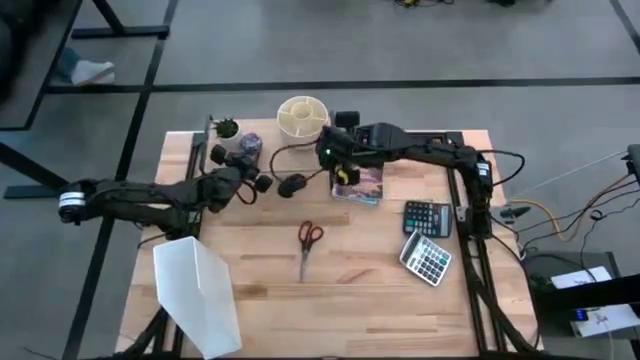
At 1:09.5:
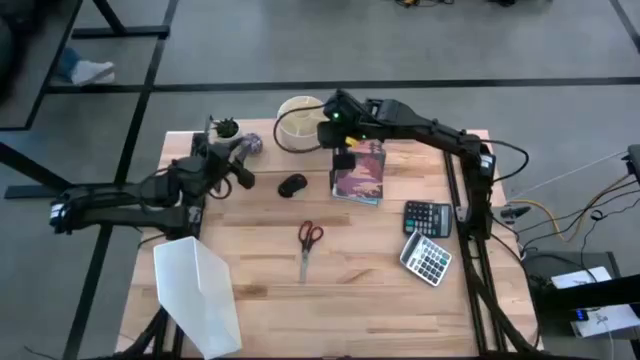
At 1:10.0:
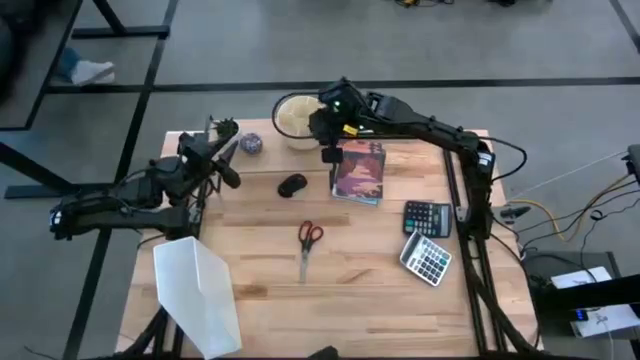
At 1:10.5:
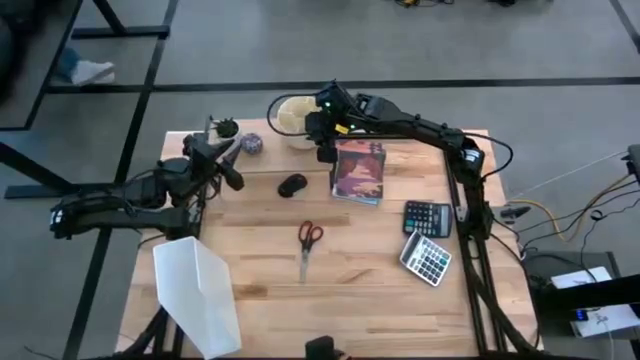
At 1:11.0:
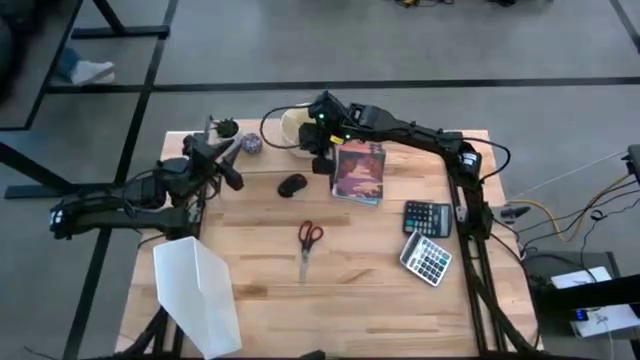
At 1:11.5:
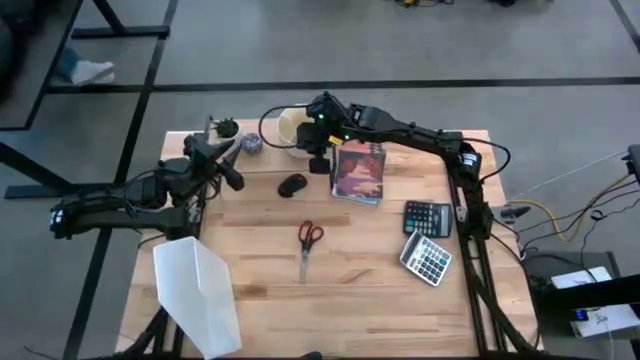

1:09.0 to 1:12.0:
Task: Stock shelves
Adjust the white pen organizer on the shelf

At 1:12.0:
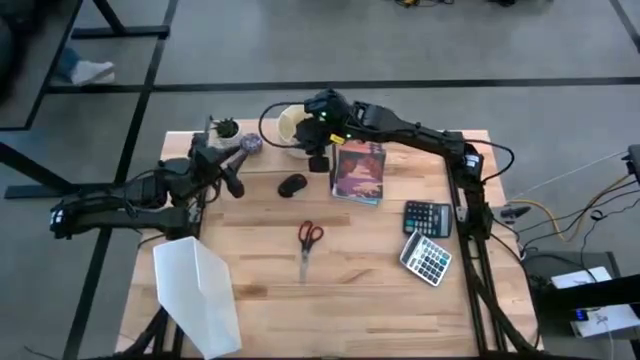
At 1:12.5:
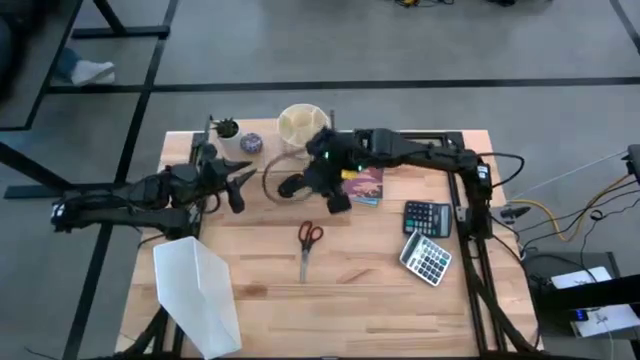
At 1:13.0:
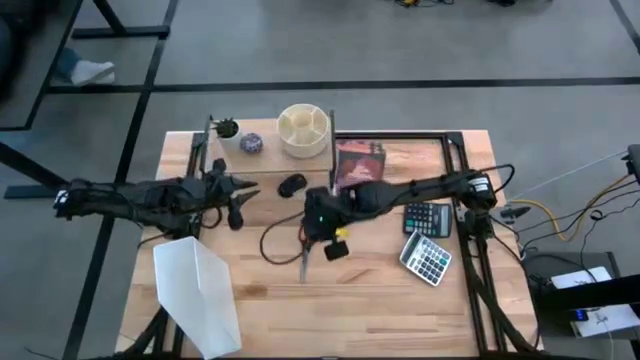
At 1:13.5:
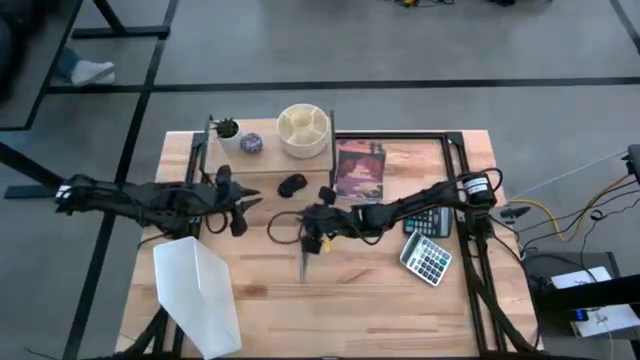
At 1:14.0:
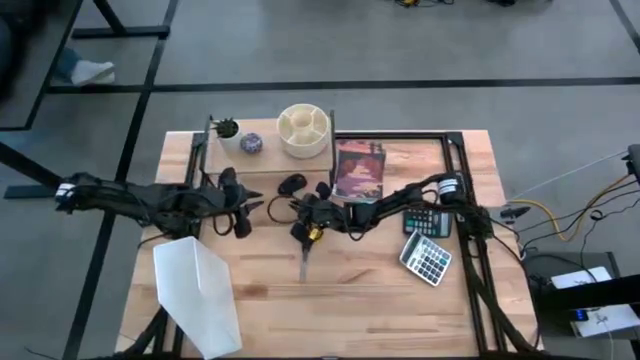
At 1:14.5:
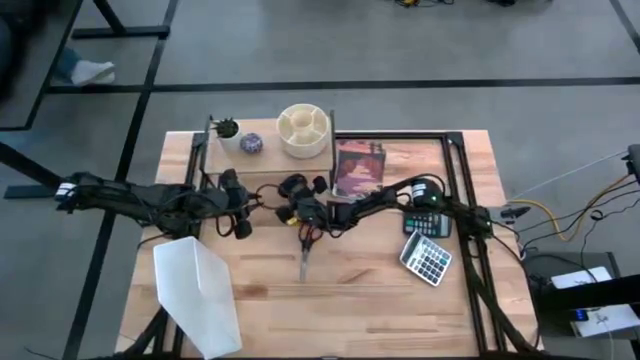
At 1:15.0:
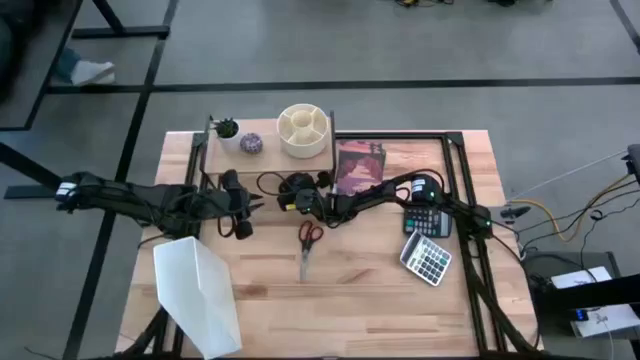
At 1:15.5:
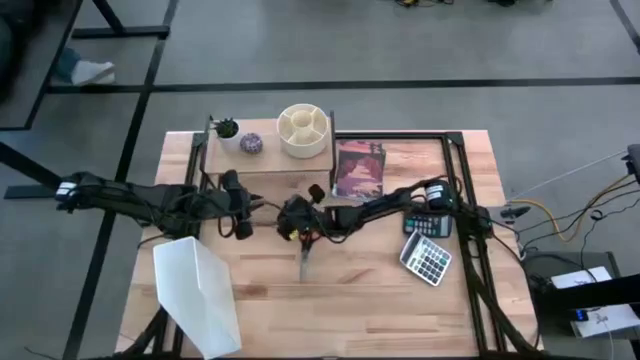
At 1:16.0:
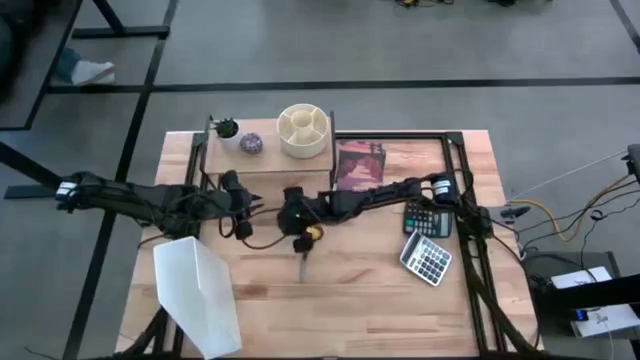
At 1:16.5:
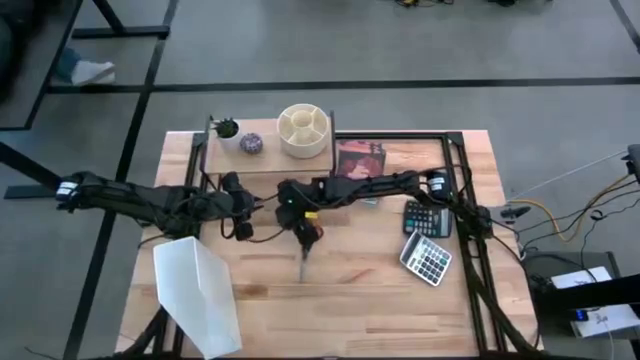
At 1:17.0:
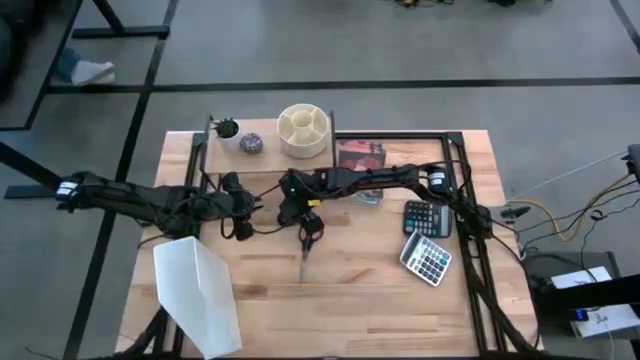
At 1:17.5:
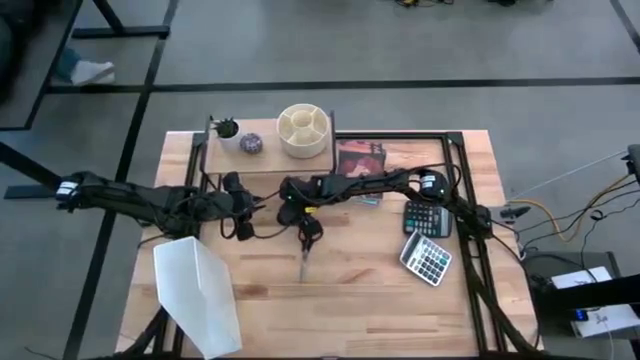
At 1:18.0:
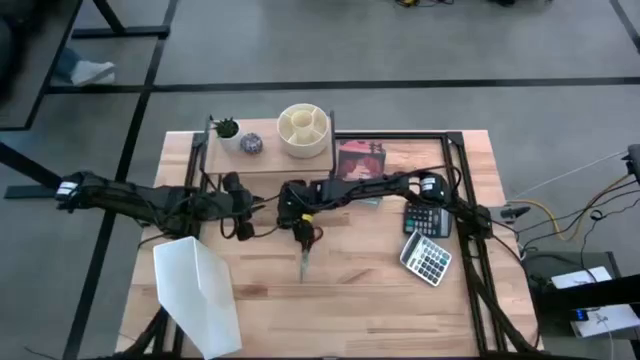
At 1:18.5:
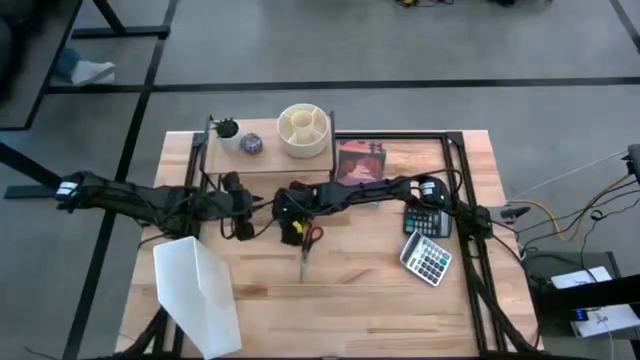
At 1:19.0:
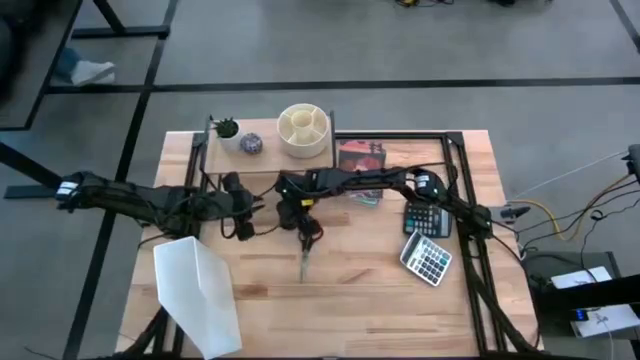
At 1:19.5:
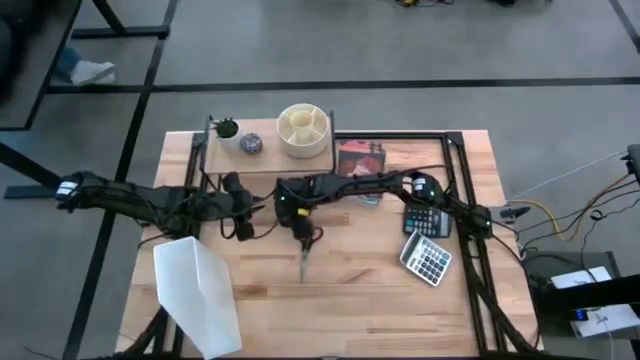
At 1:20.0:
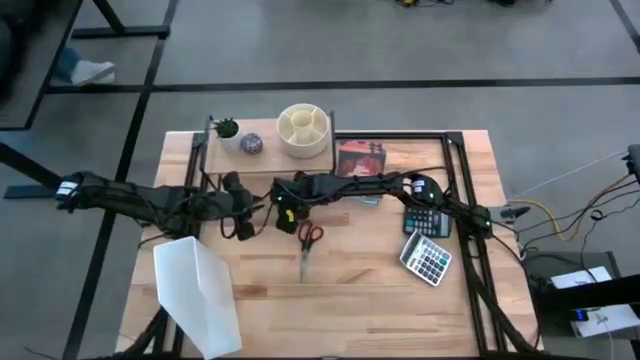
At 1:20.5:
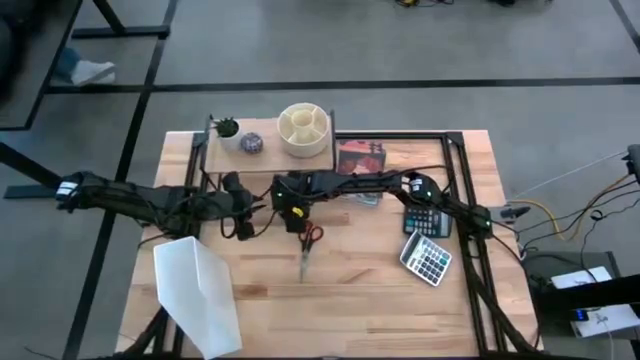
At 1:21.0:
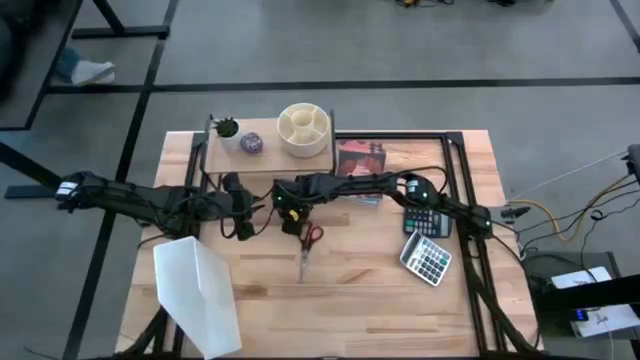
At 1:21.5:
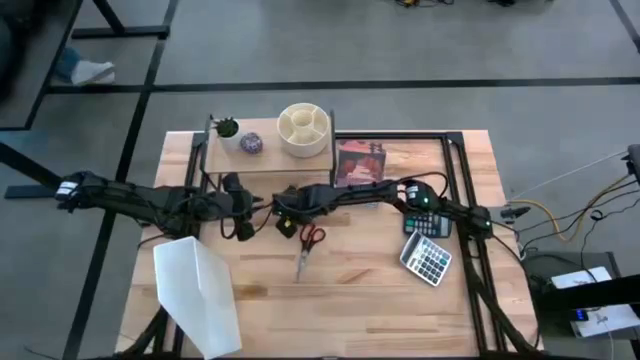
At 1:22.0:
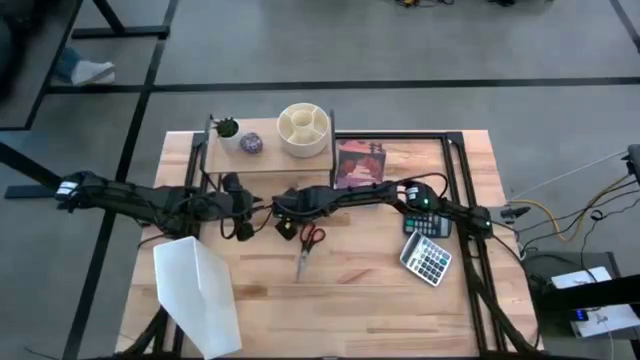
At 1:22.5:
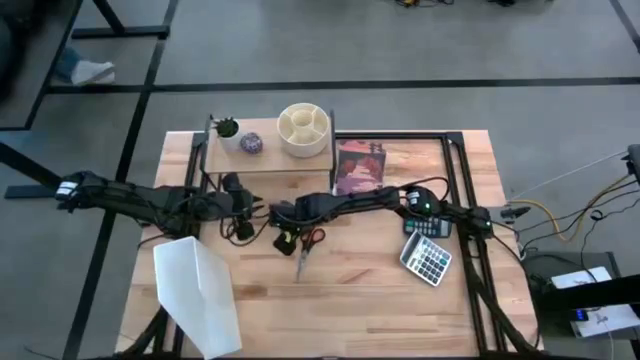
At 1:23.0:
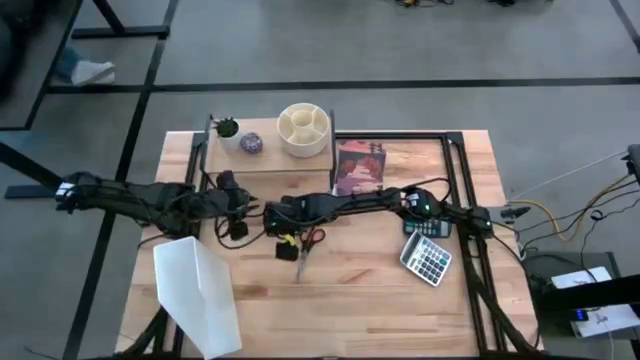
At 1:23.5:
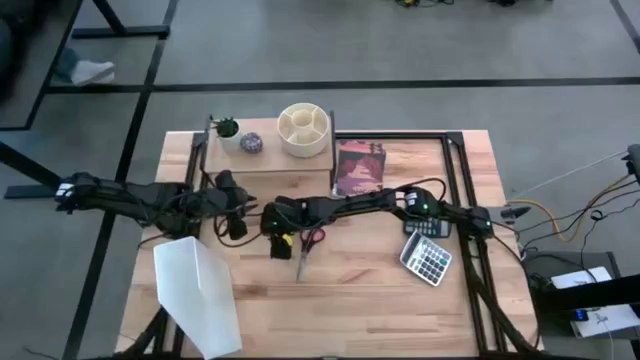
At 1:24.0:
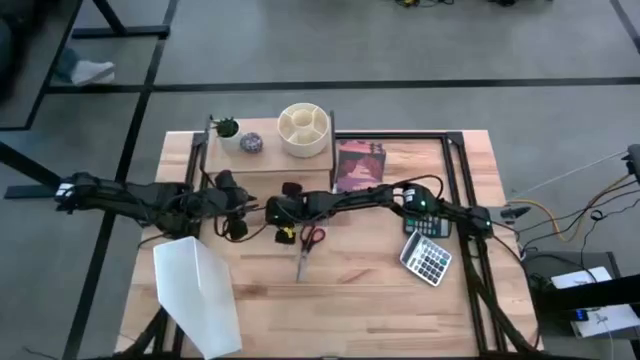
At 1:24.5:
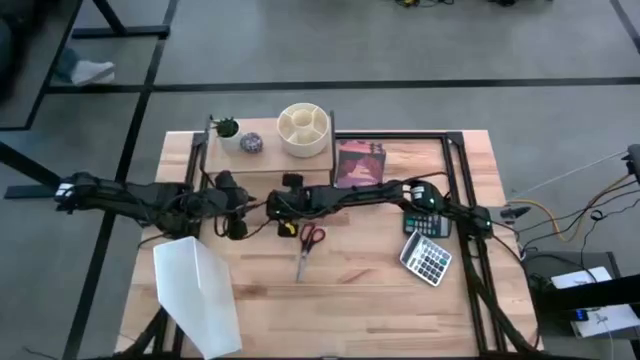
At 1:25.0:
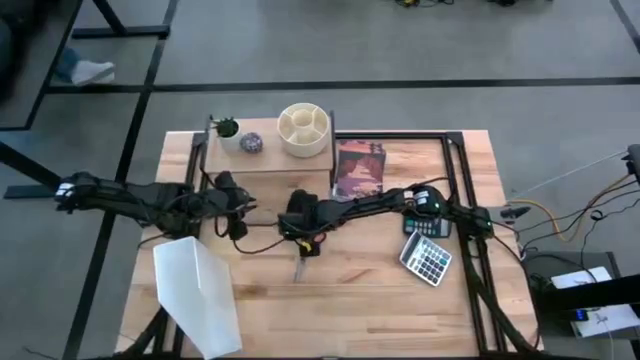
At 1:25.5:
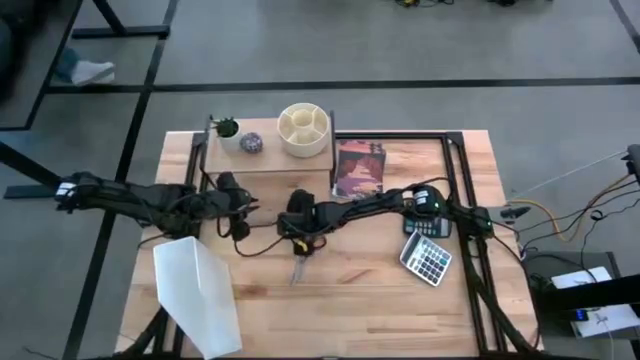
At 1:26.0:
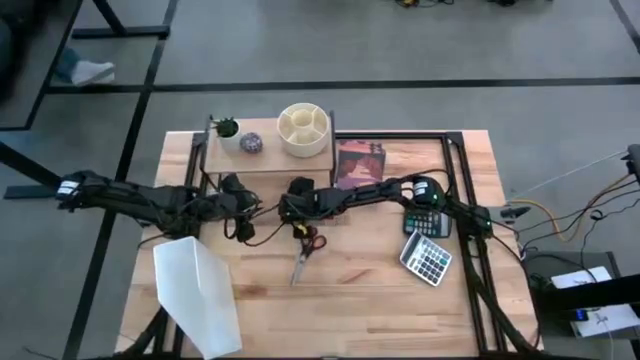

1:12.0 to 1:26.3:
Adjust the black mouse under the shelf
